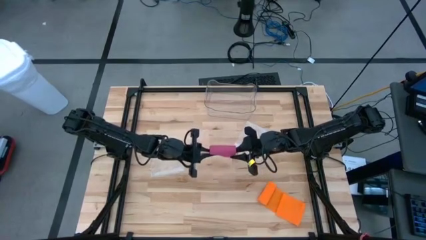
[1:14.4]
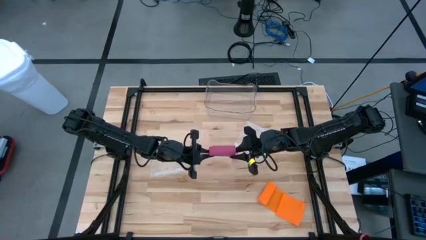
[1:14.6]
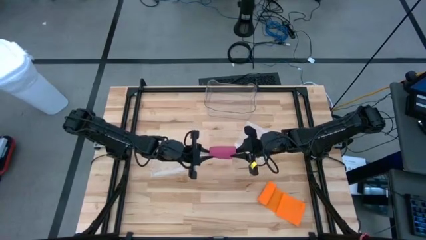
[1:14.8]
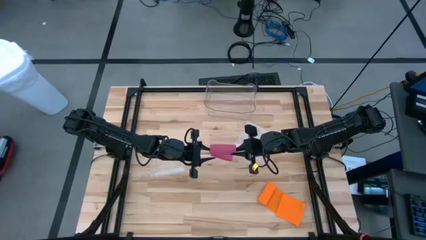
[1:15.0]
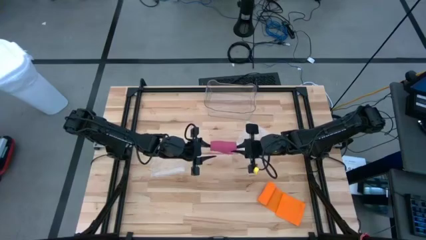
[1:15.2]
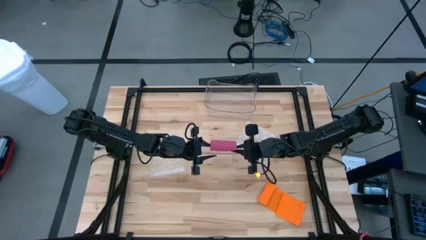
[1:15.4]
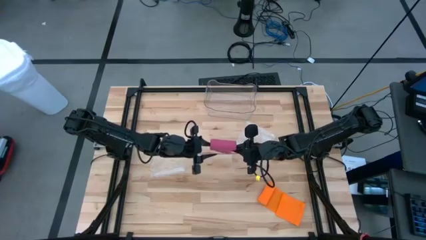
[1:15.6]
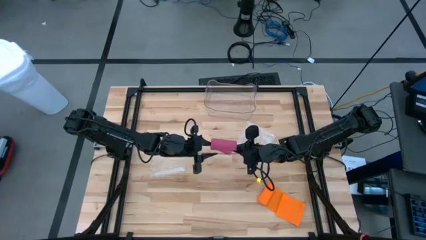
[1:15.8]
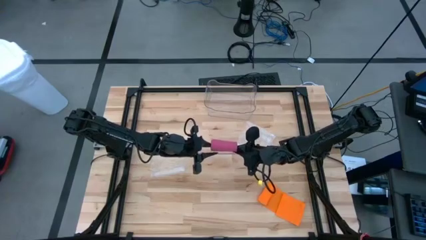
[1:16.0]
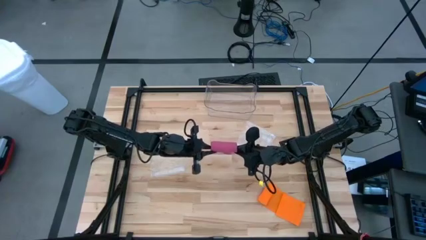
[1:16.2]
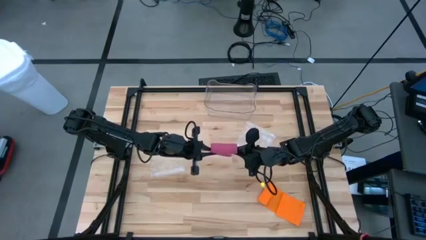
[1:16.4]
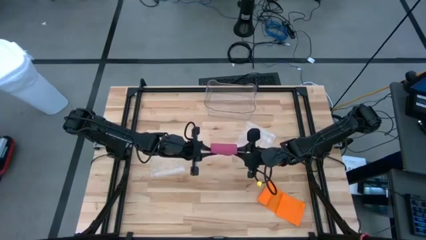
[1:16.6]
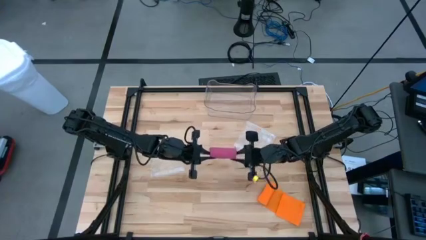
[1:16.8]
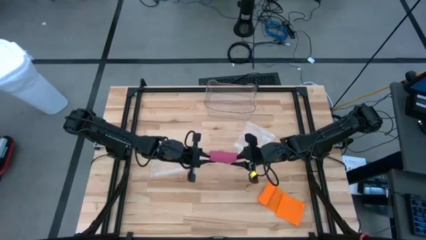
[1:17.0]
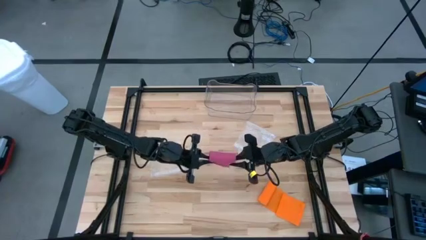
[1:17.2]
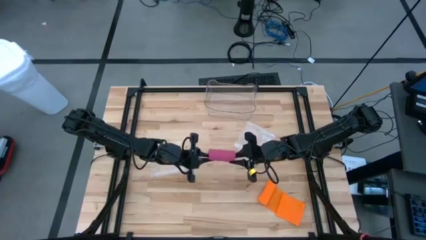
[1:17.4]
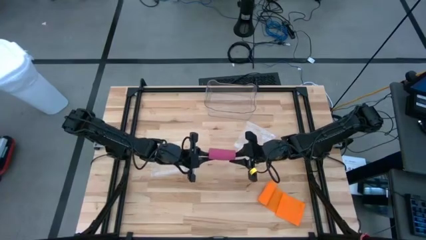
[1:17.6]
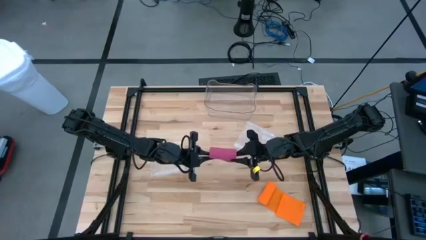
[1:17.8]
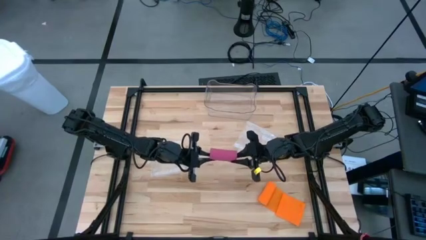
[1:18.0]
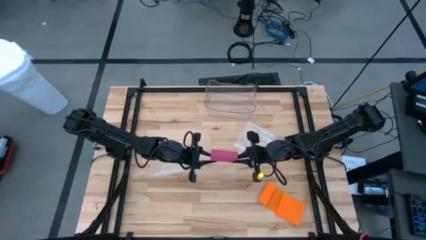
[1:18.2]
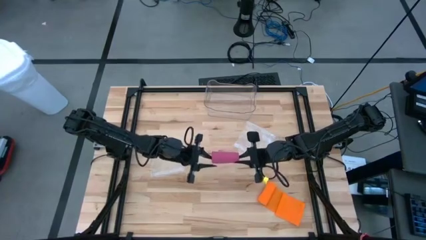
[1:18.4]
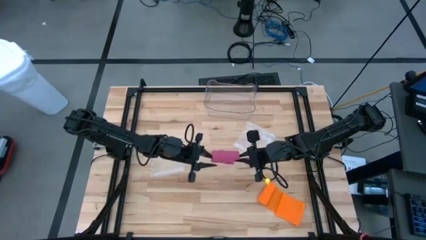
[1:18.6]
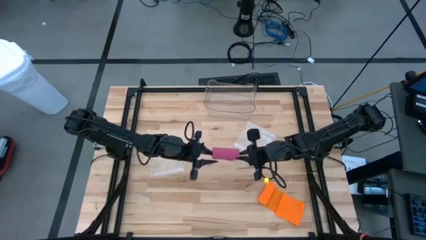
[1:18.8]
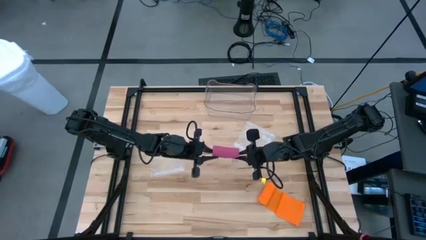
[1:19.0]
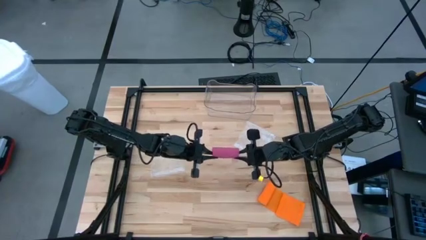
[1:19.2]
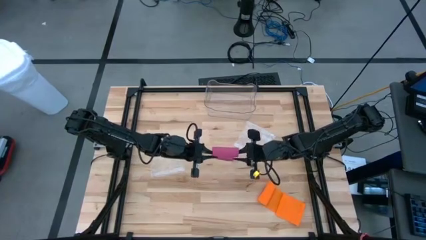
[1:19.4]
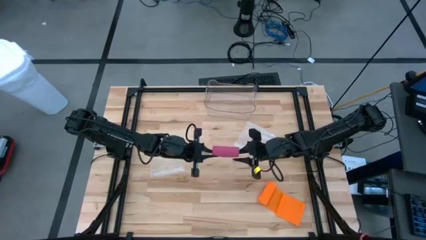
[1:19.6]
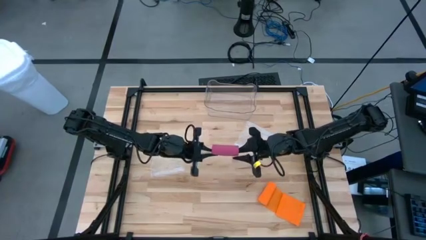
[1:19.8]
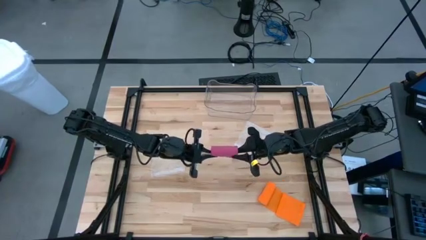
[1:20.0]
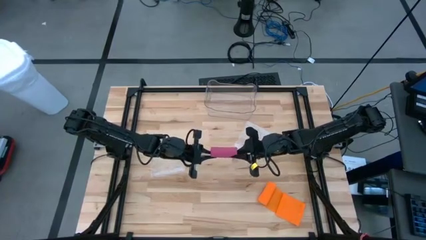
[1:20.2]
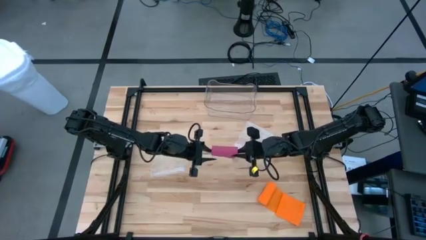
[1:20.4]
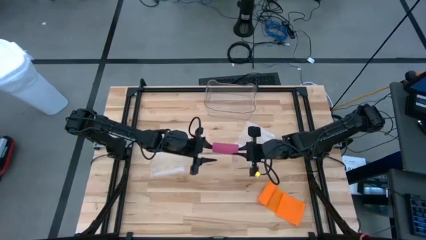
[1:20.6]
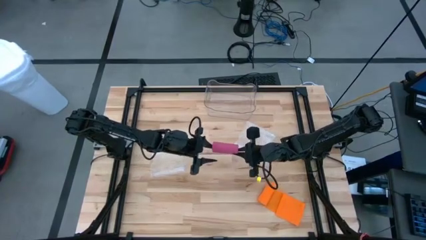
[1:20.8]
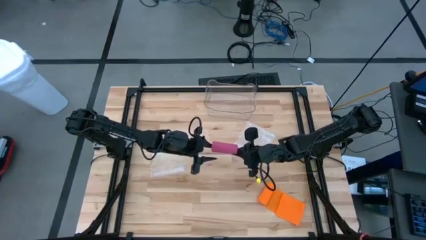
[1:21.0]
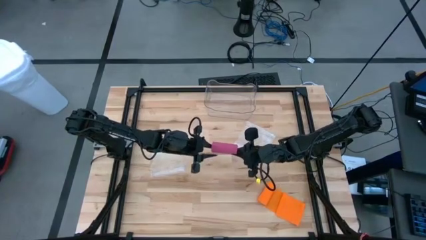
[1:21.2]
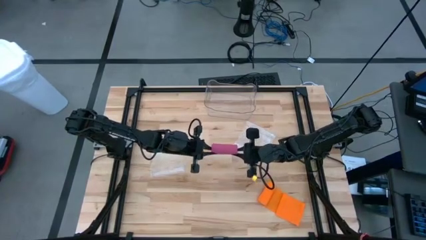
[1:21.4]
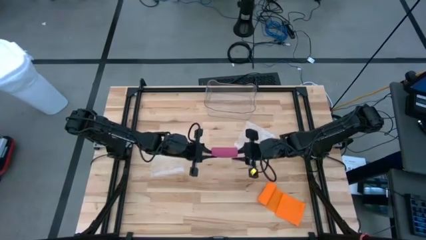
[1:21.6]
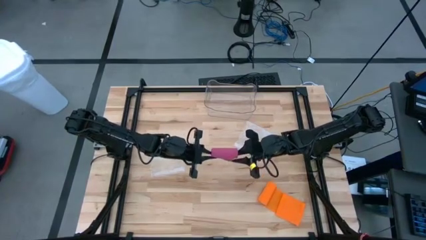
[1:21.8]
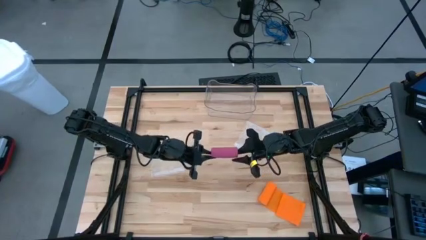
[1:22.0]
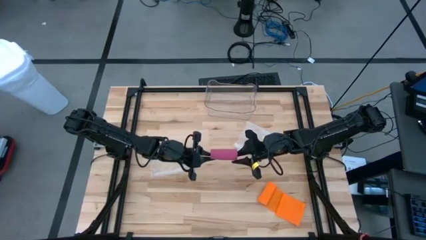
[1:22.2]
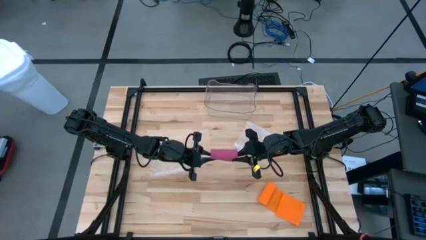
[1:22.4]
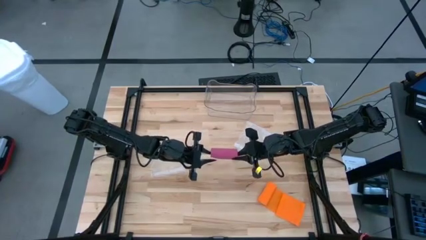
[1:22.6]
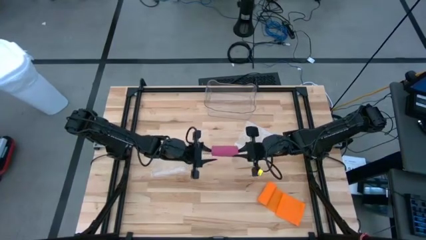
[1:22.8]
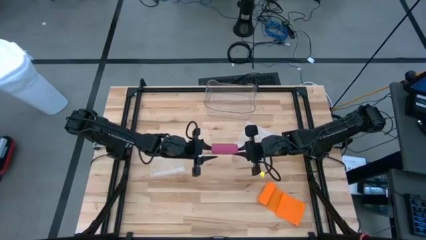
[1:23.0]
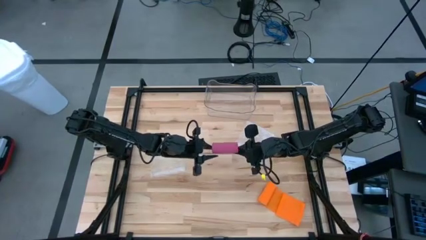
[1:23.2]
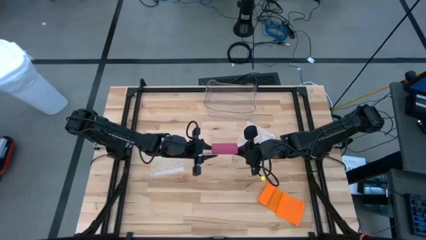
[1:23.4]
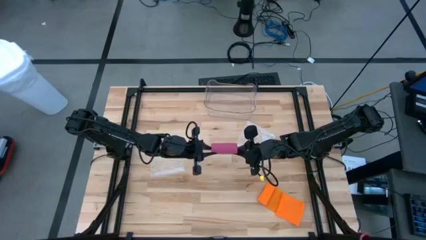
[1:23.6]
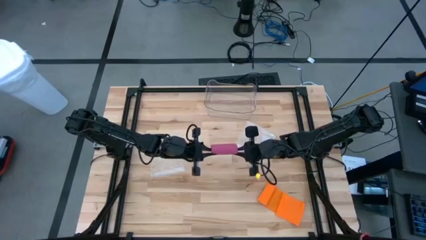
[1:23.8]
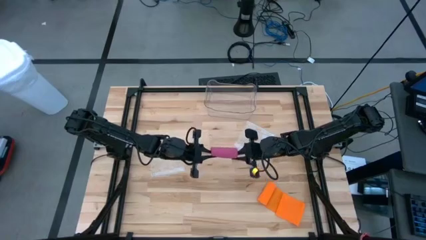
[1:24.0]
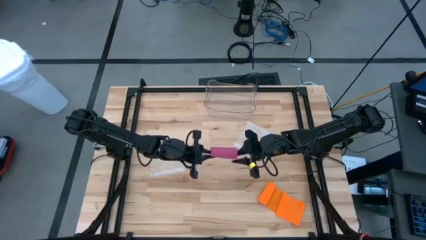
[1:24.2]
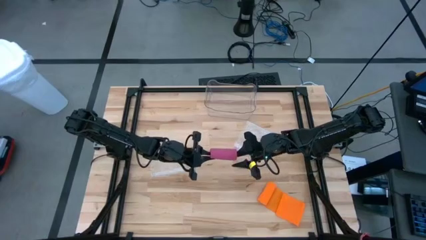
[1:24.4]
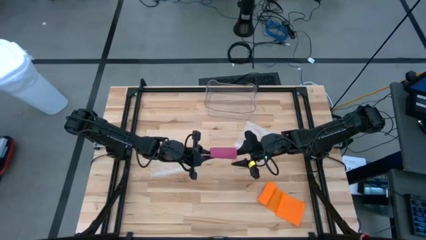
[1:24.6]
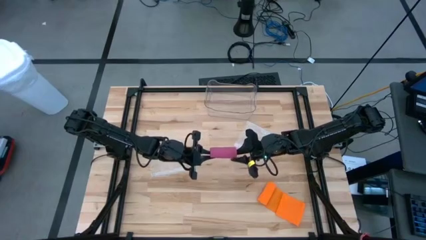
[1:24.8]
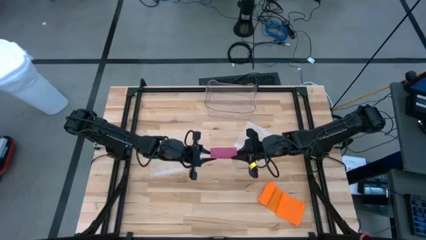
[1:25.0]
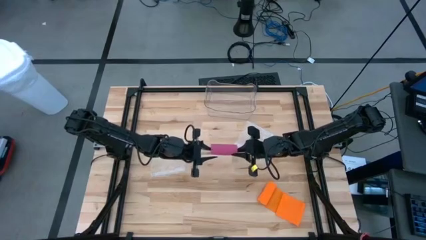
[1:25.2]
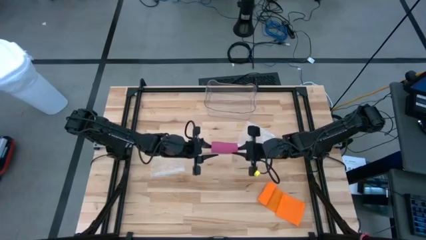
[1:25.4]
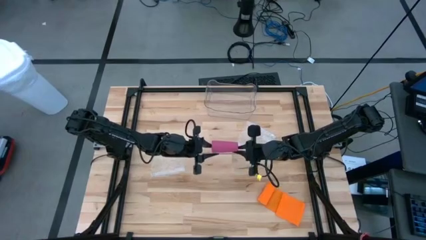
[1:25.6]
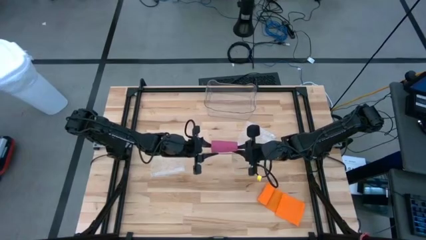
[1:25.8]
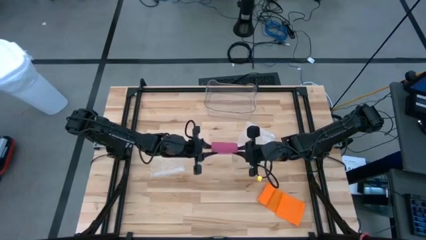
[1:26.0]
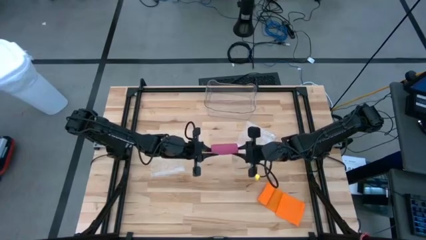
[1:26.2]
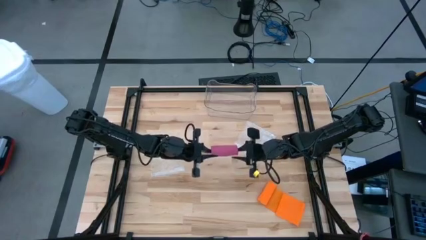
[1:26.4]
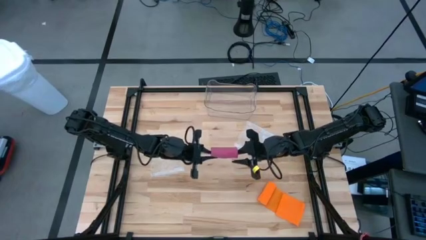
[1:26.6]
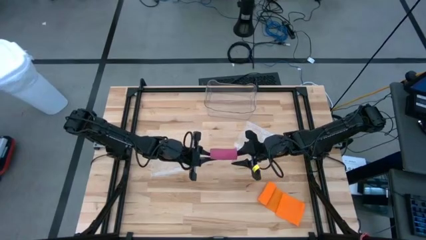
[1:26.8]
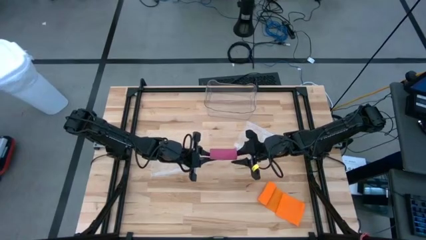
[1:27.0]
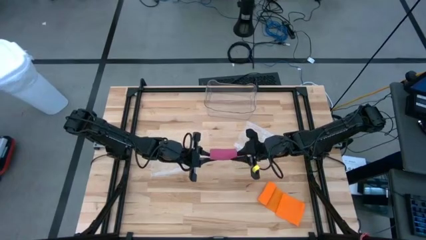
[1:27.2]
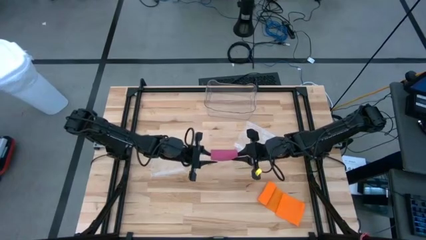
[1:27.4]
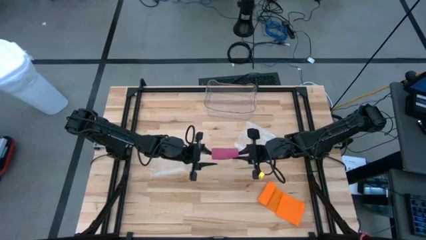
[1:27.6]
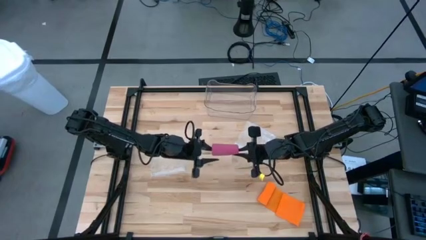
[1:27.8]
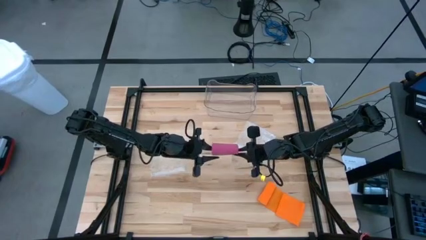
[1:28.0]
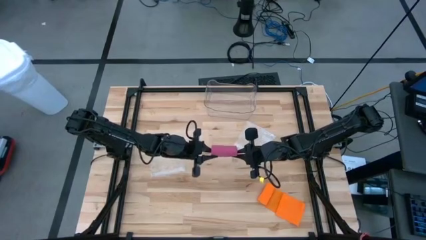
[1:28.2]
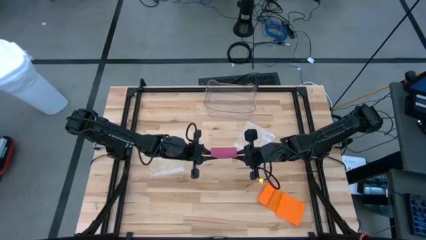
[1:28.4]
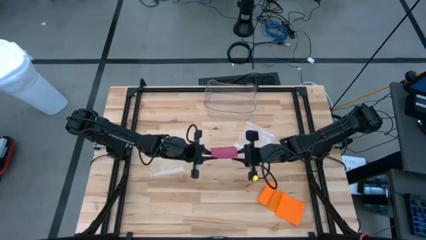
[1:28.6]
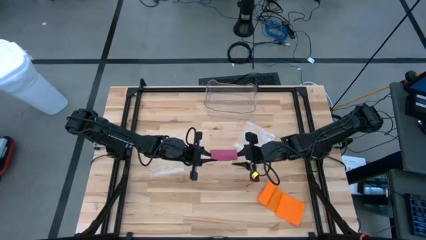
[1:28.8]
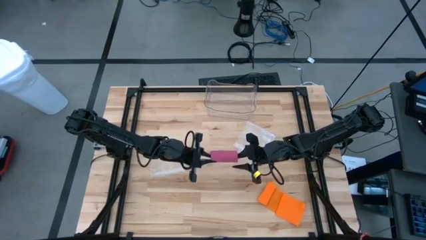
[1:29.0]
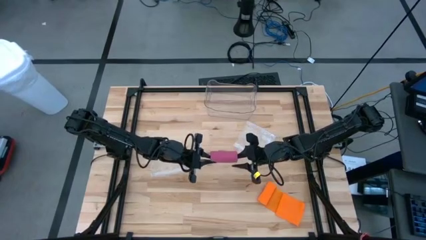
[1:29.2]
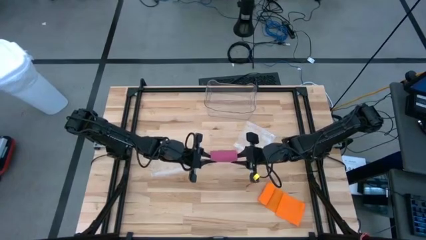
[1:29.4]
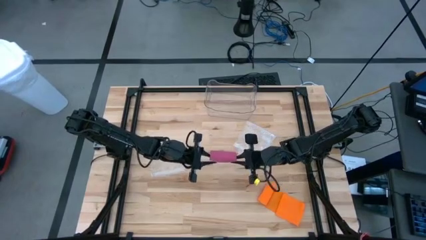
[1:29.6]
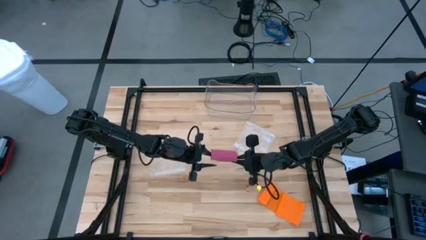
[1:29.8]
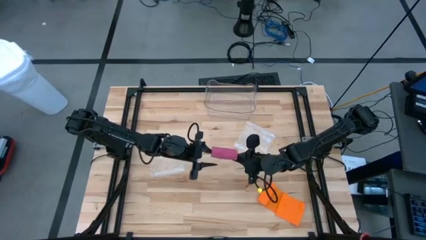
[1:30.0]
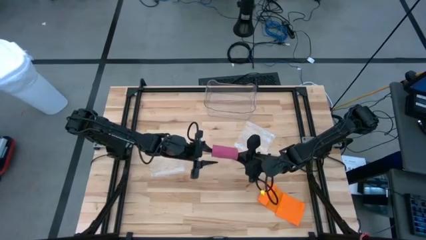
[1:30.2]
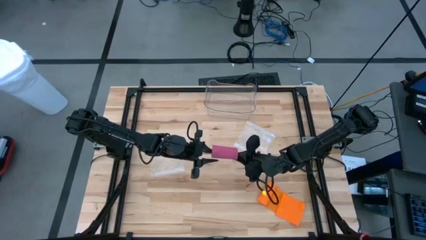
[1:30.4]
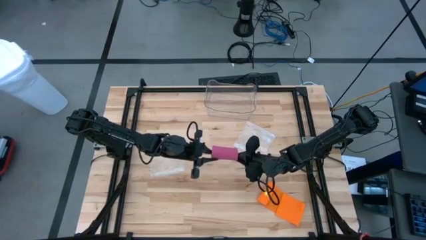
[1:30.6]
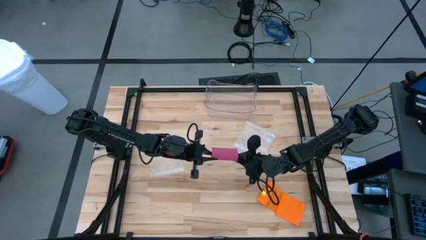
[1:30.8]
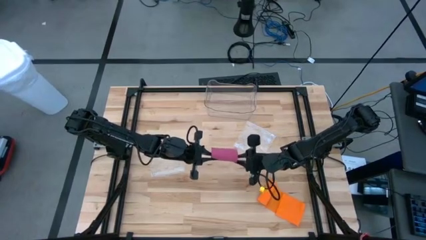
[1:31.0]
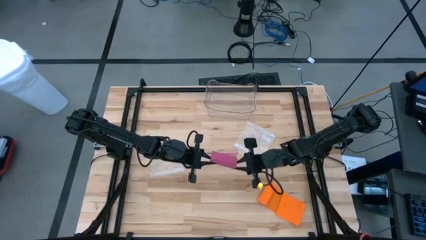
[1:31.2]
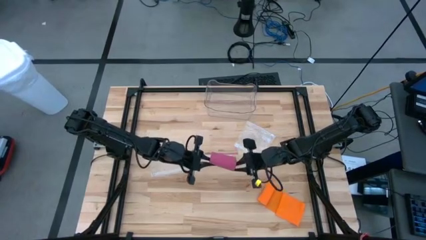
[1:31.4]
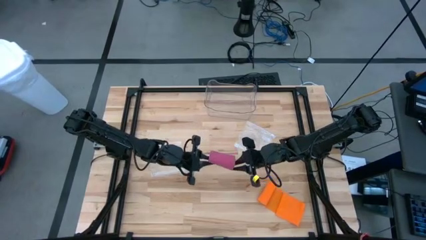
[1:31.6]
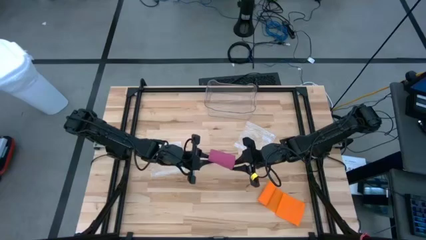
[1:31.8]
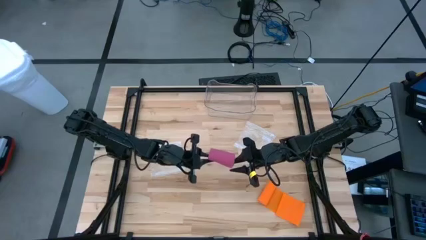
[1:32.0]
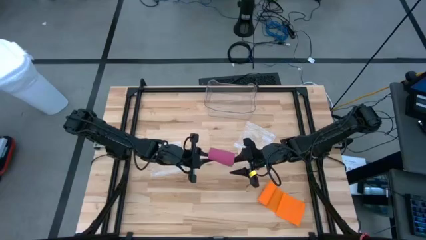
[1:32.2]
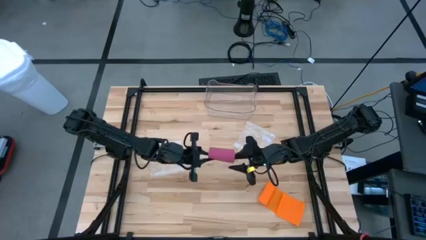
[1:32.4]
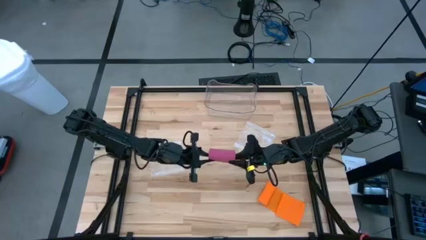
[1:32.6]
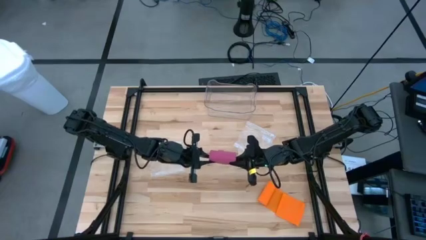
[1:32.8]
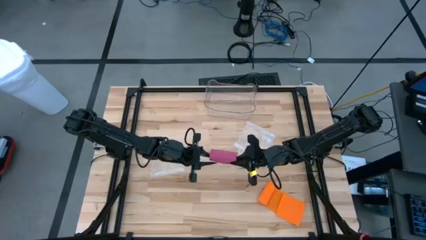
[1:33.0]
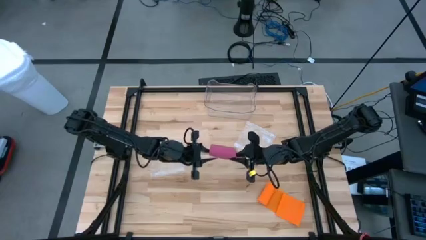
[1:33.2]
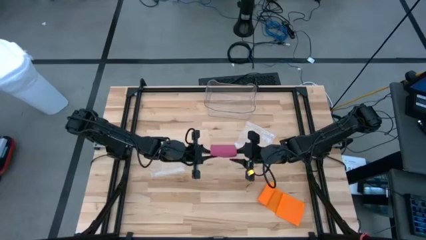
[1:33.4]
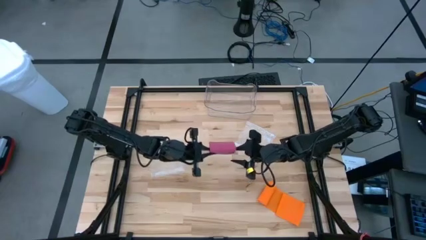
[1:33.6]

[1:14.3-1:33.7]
Task: Roll bandage
Roll the pink bandage
